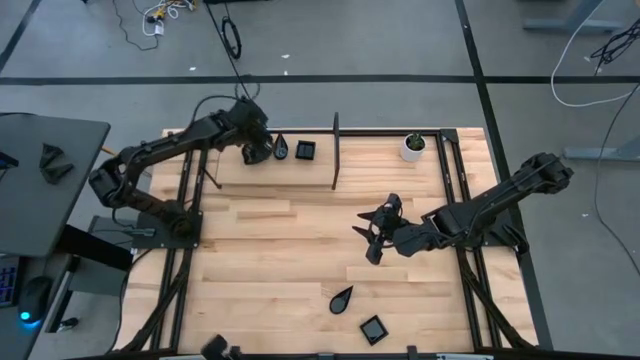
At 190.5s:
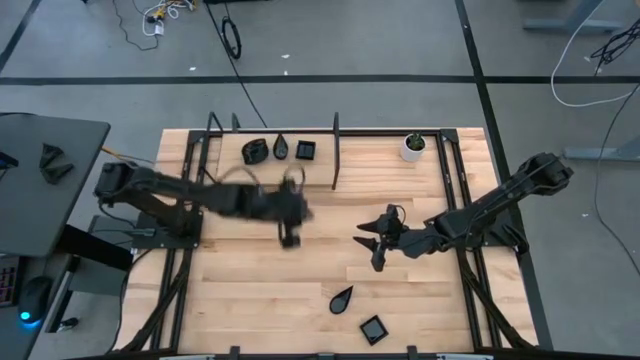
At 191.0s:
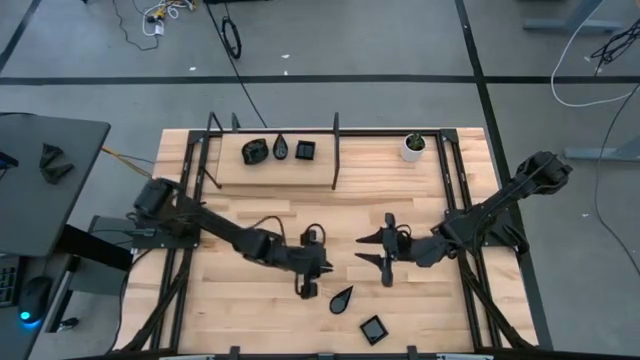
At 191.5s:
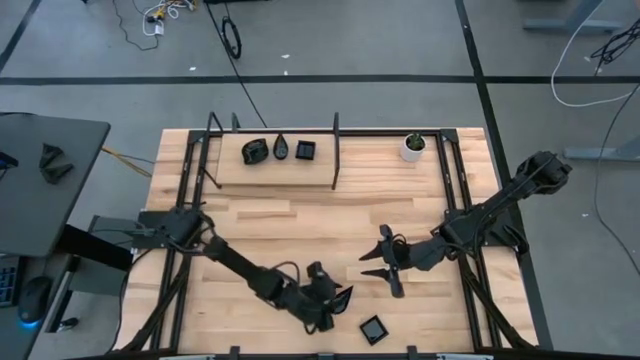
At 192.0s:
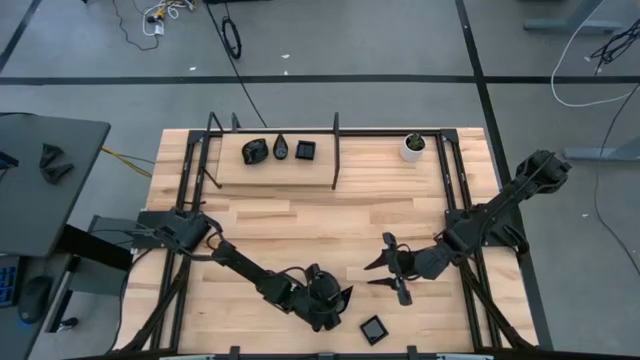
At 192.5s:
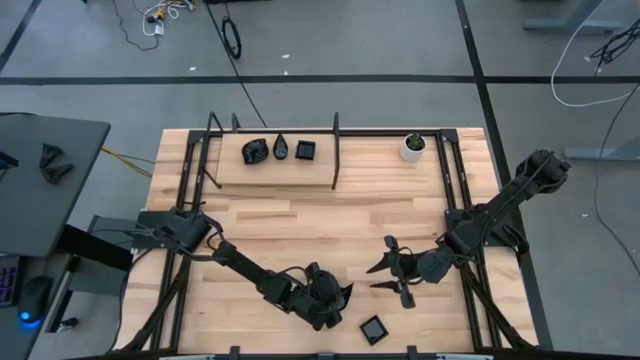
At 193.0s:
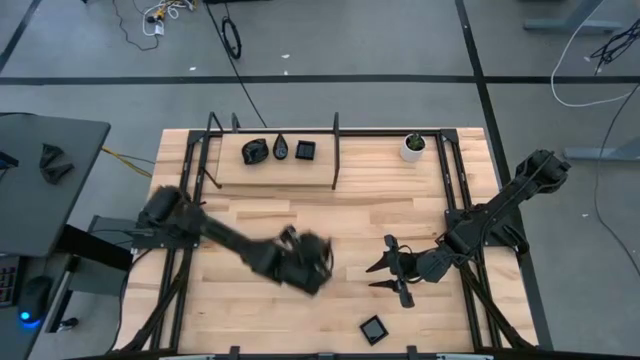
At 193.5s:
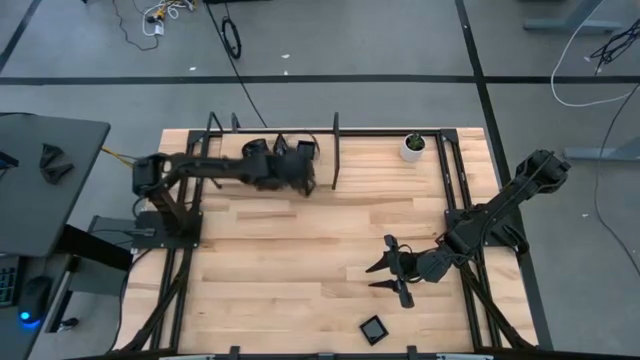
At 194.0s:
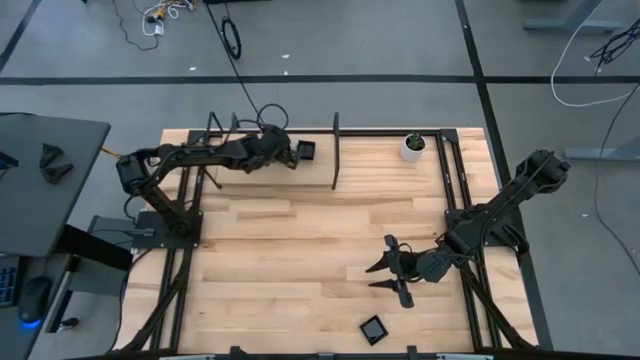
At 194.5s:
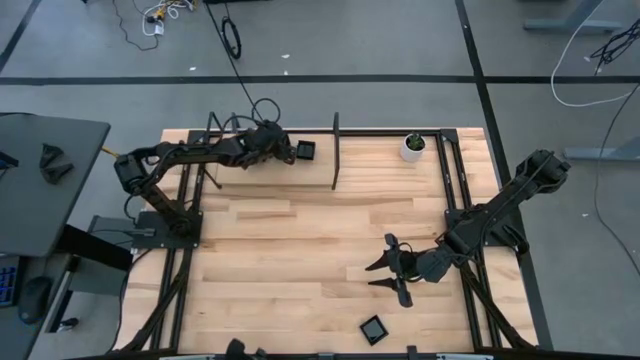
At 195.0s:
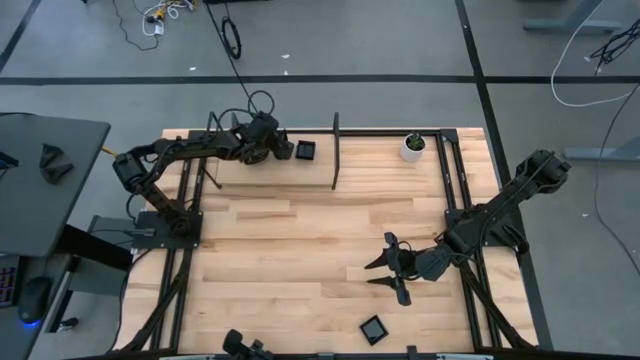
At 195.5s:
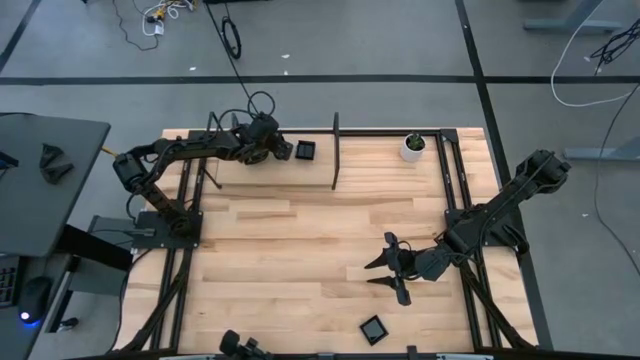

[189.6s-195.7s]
Task: Pick & Place Mini shaped plates
Stack the black drop-shaped plate on top of the stacked black drop-shaped plates on the shelf

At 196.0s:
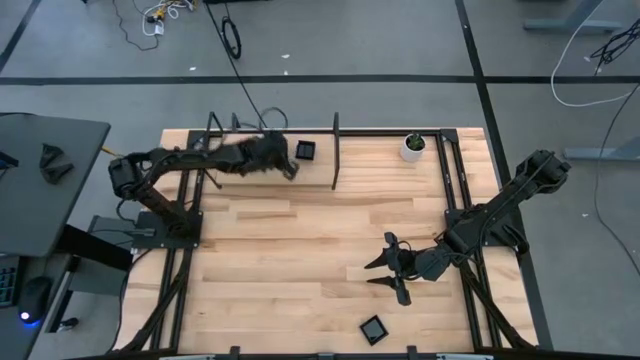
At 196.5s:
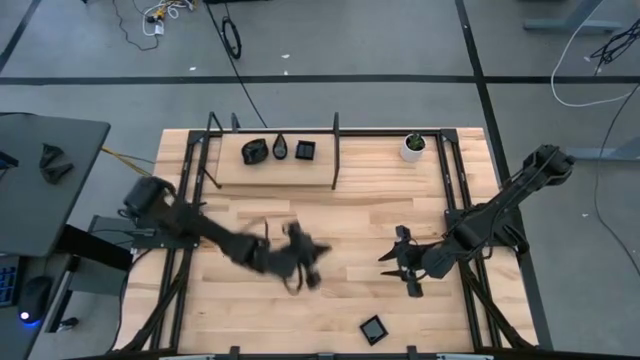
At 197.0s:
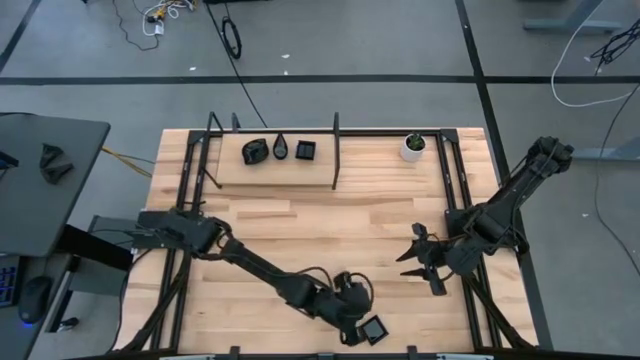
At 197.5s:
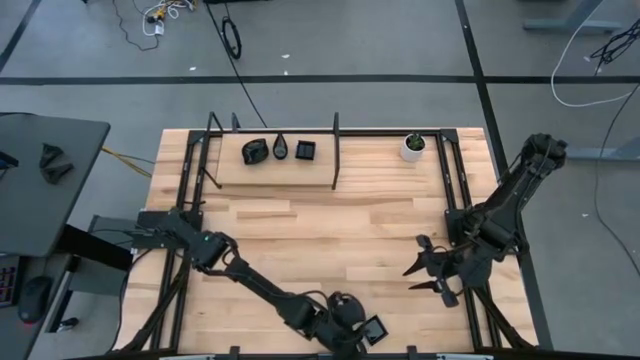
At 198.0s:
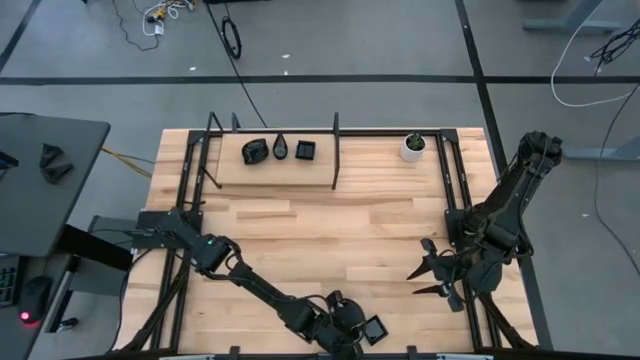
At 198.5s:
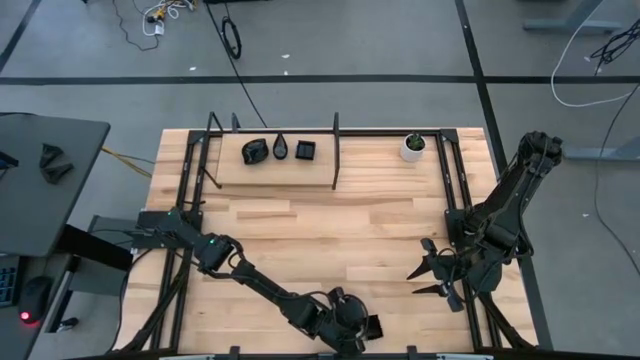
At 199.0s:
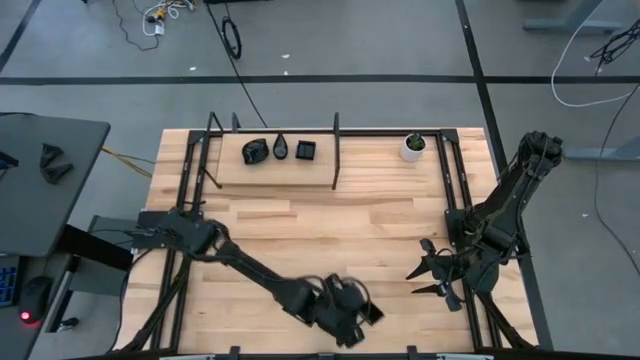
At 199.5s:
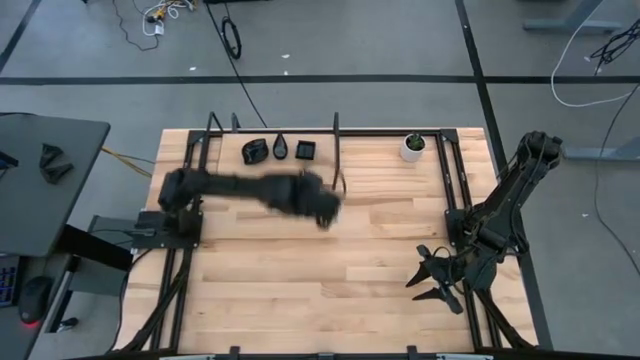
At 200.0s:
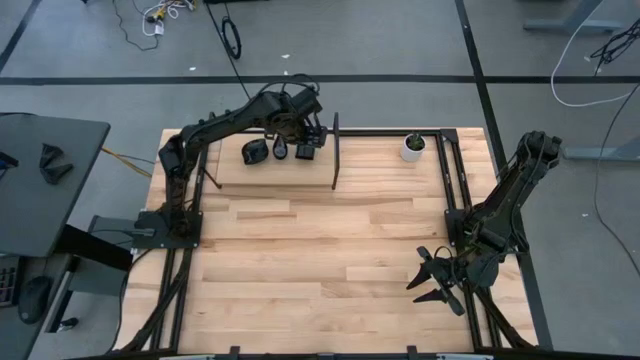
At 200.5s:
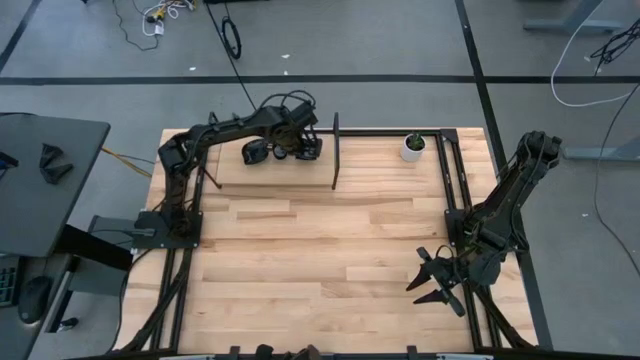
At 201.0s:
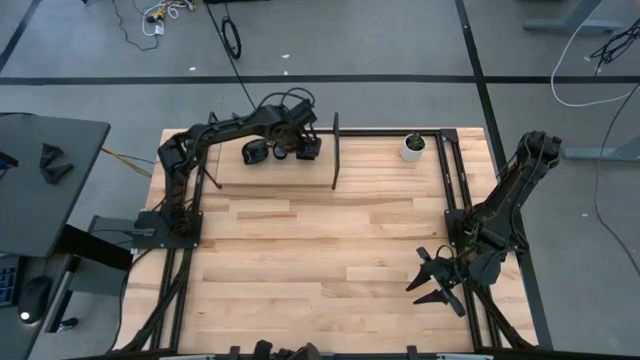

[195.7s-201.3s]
Stack the black square plate on top of the stacked black square plates on the shelf

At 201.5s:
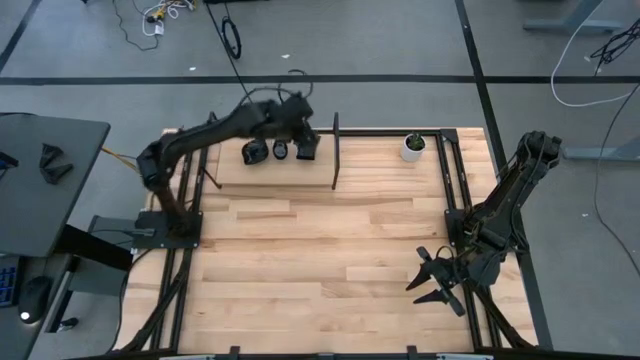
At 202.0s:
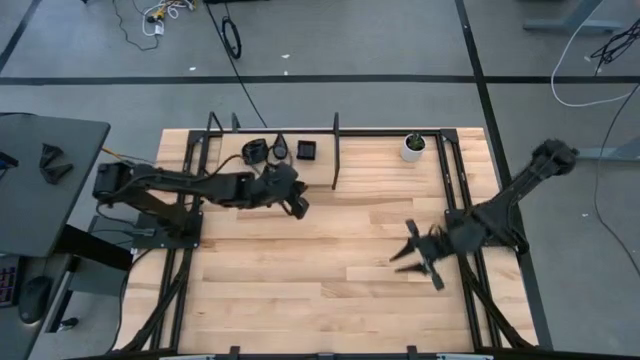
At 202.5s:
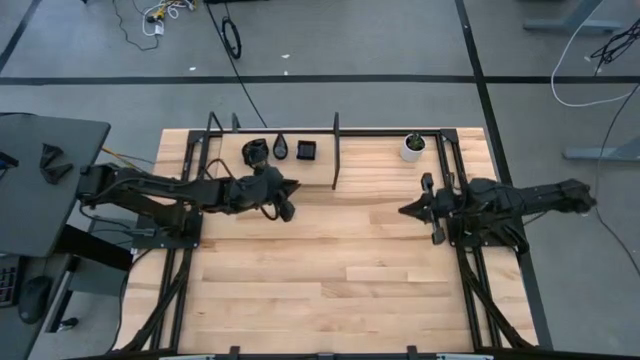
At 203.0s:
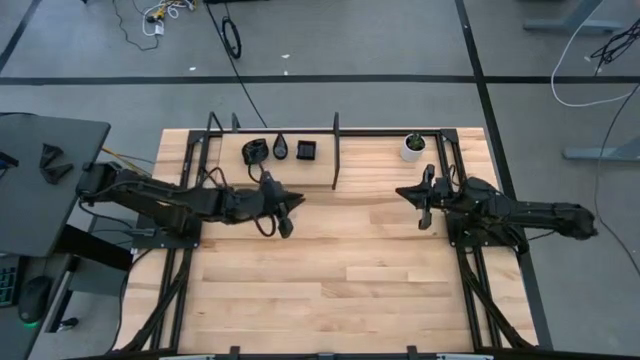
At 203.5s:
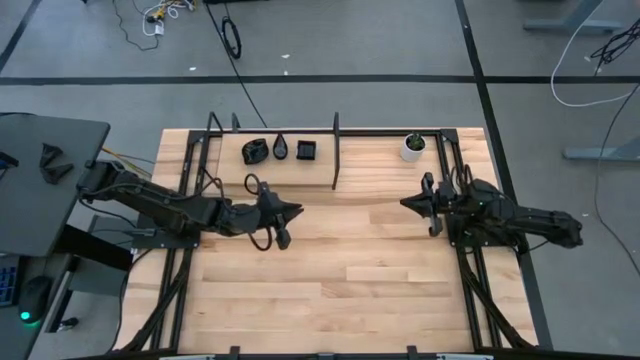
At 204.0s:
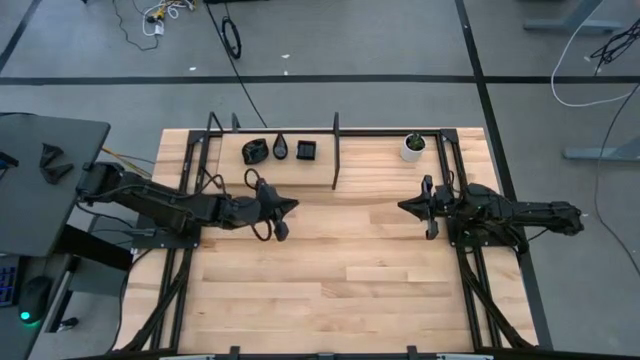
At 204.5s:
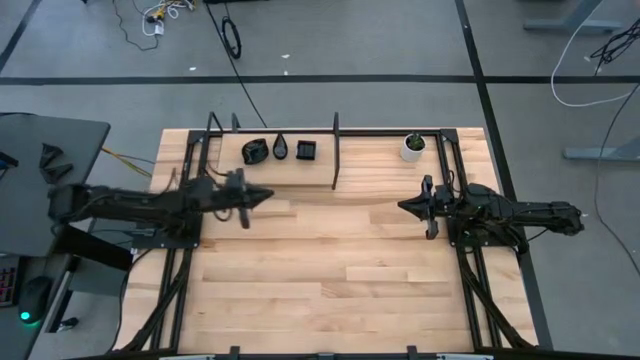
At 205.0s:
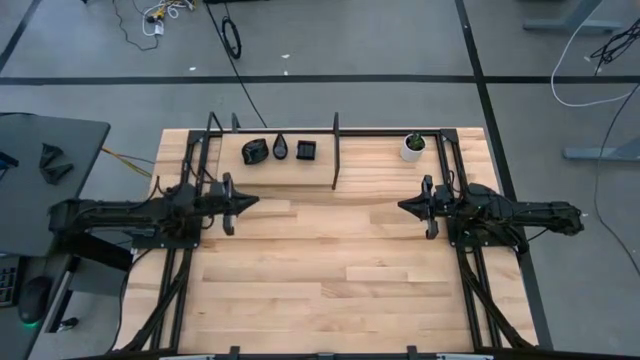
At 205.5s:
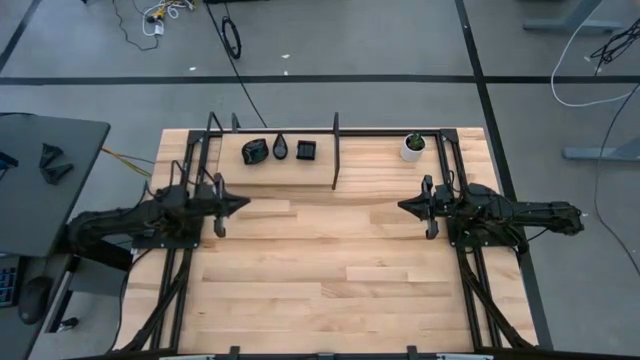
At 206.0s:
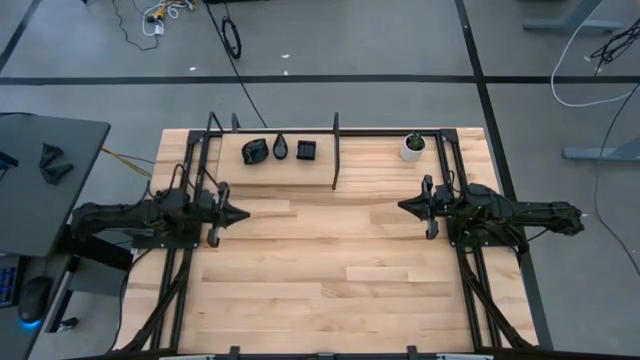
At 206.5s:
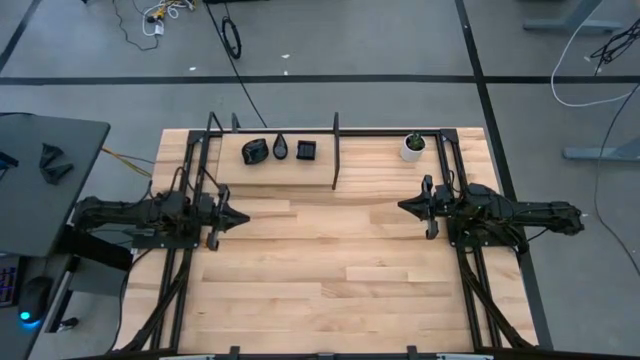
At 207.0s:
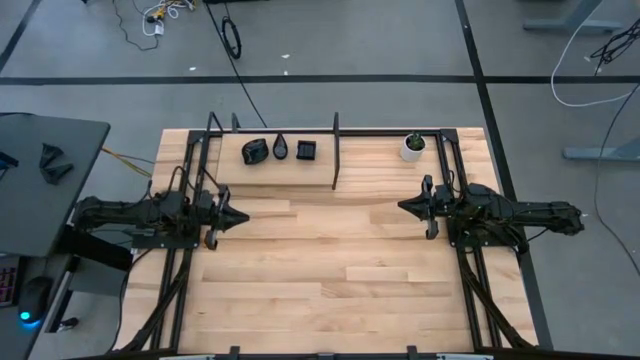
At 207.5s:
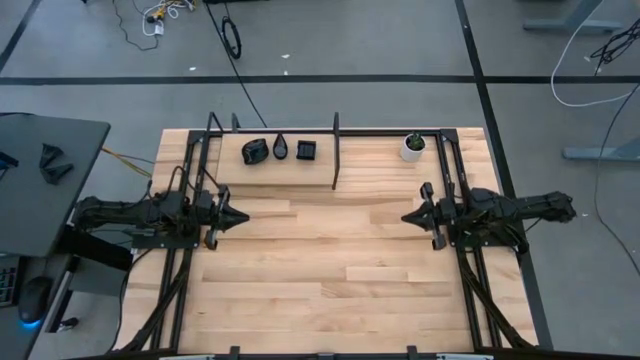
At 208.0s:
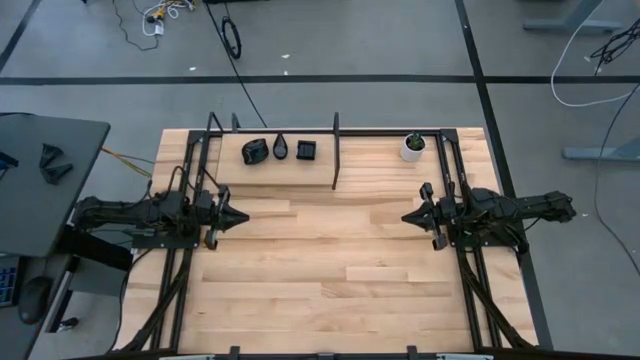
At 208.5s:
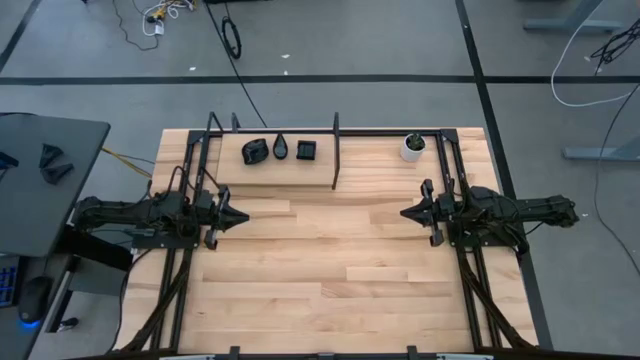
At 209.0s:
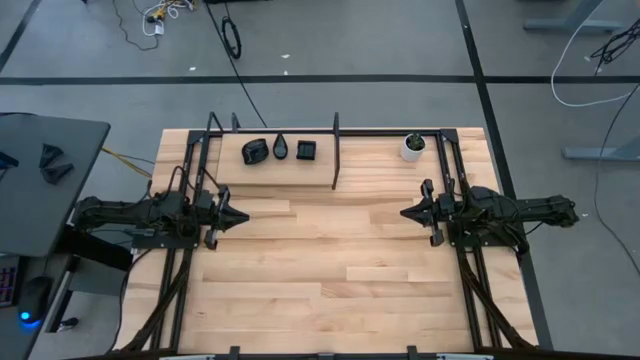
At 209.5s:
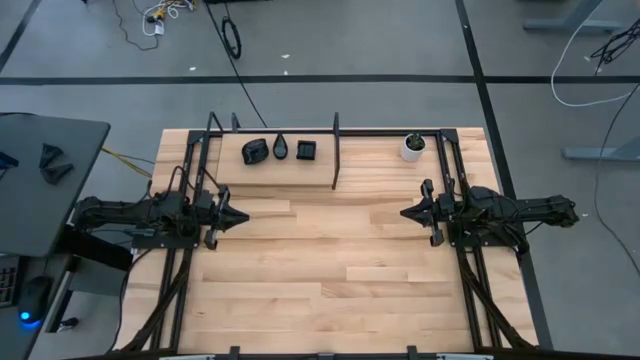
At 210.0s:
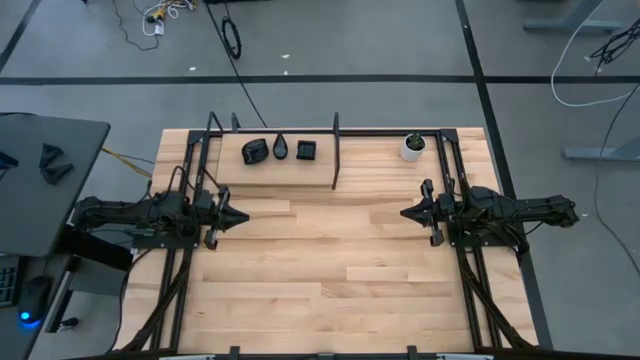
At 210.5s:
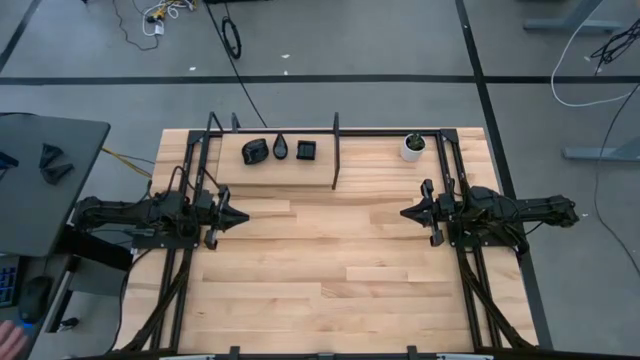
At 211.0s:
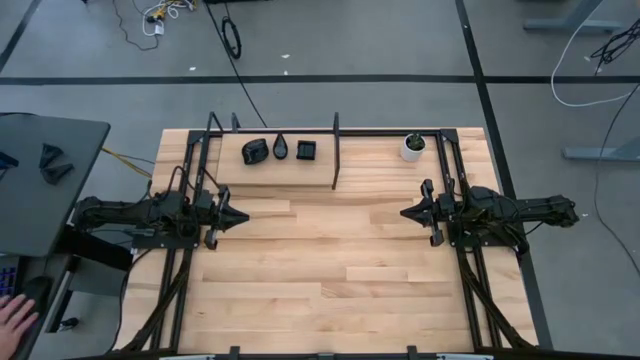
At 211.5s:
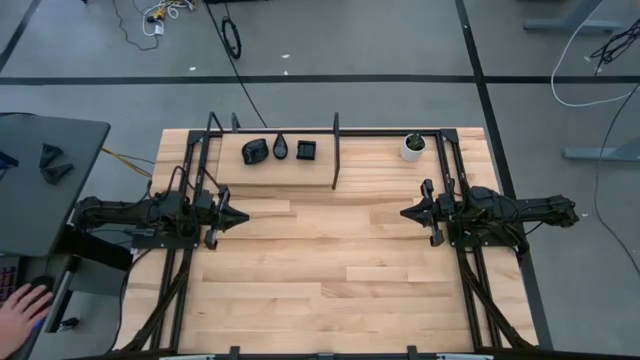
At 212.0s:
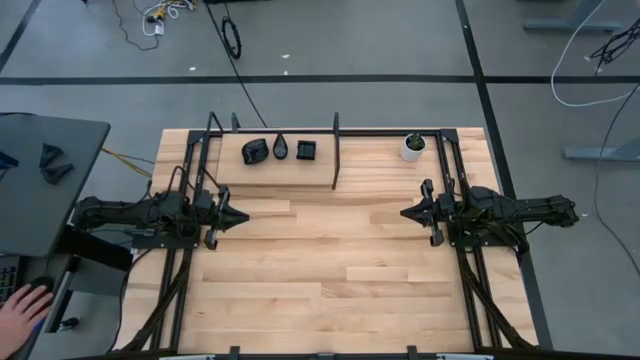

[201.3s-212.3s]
Return to Home Position
